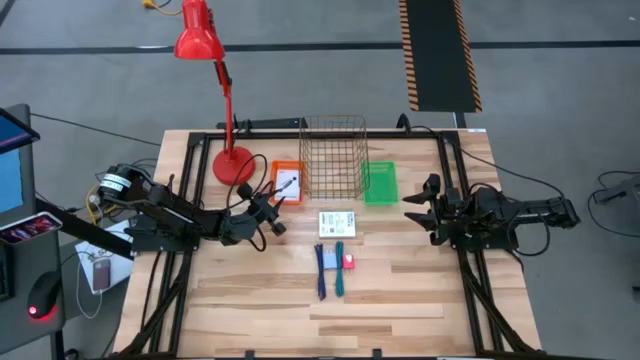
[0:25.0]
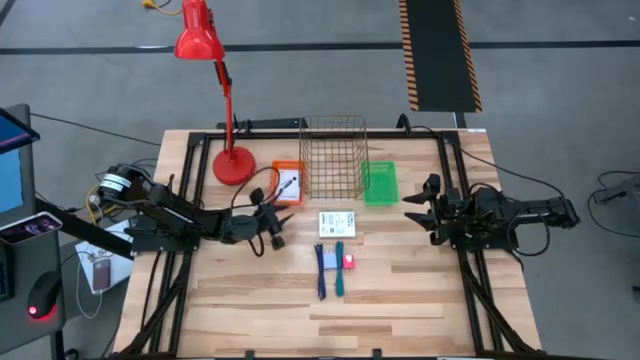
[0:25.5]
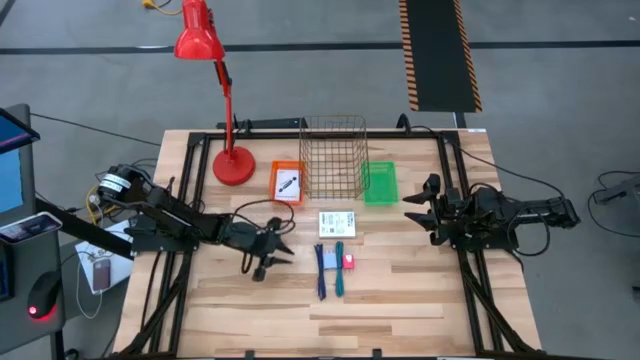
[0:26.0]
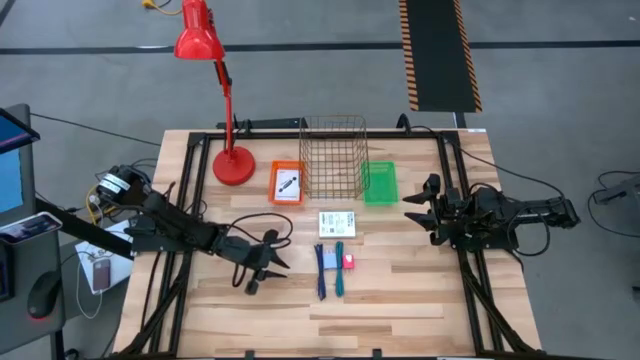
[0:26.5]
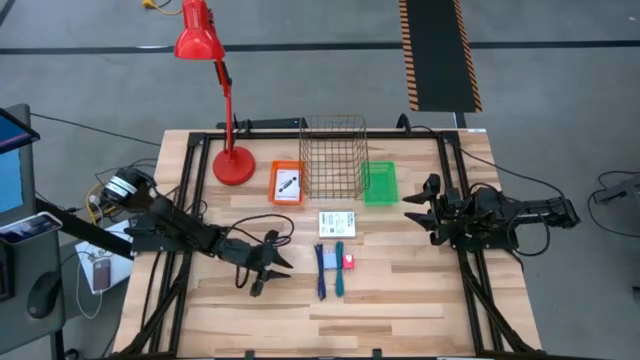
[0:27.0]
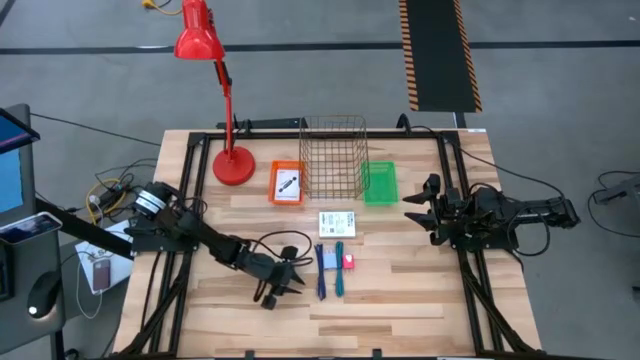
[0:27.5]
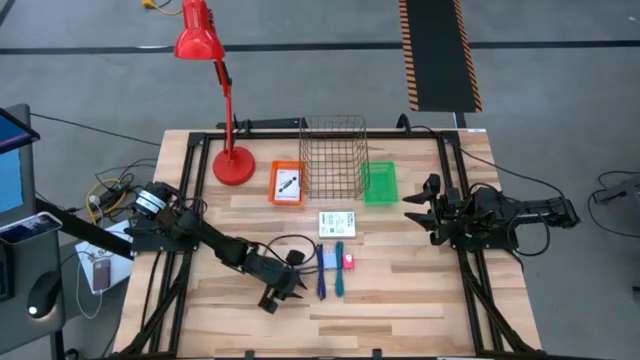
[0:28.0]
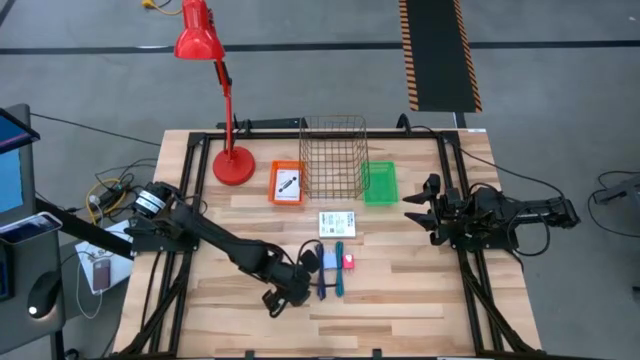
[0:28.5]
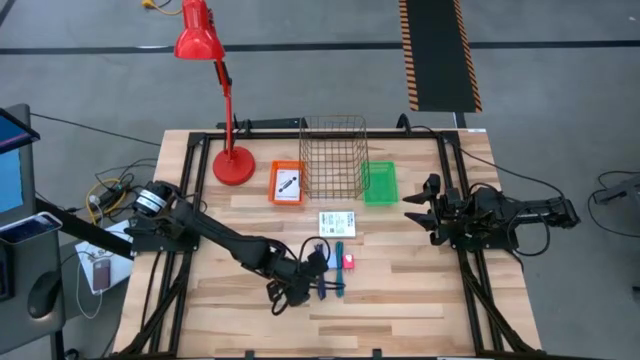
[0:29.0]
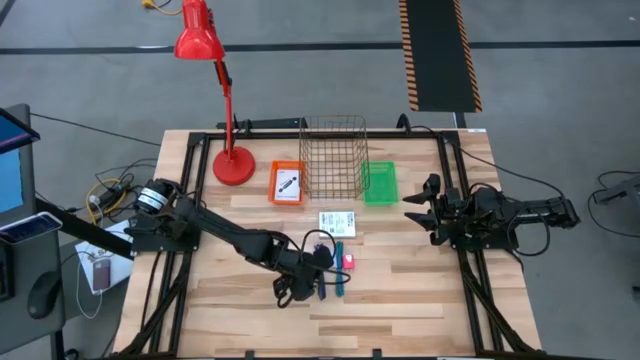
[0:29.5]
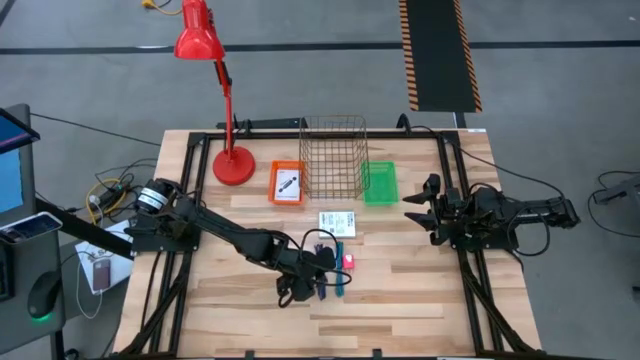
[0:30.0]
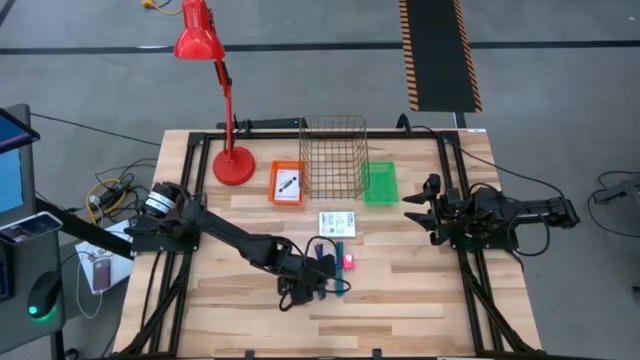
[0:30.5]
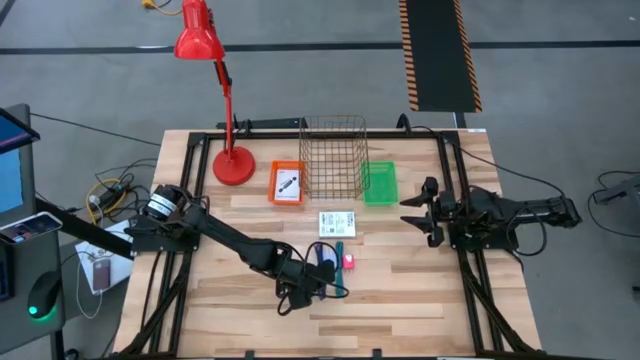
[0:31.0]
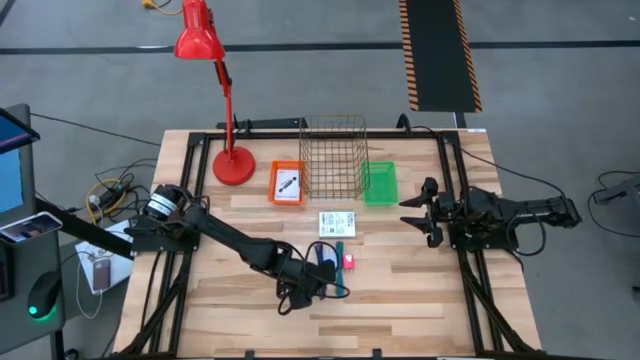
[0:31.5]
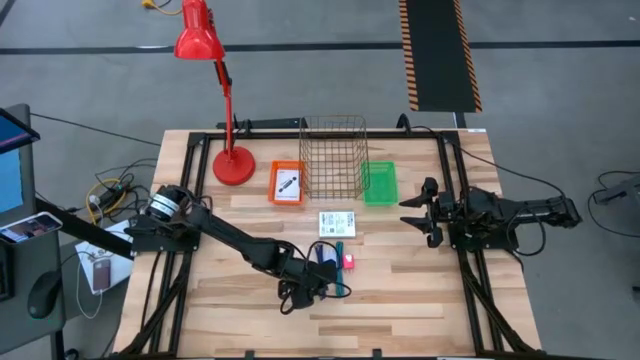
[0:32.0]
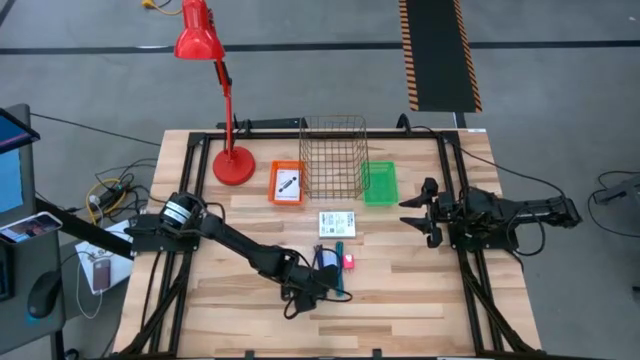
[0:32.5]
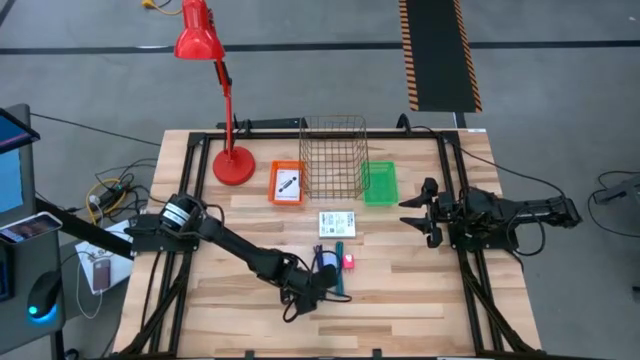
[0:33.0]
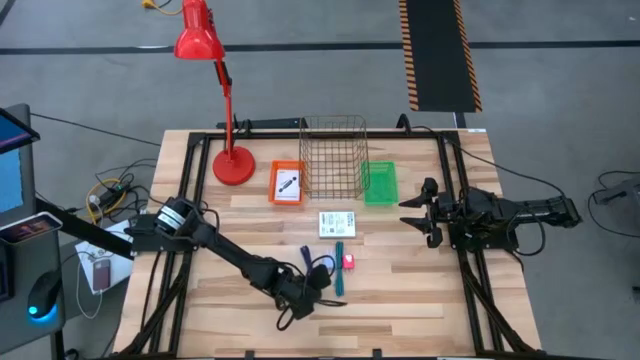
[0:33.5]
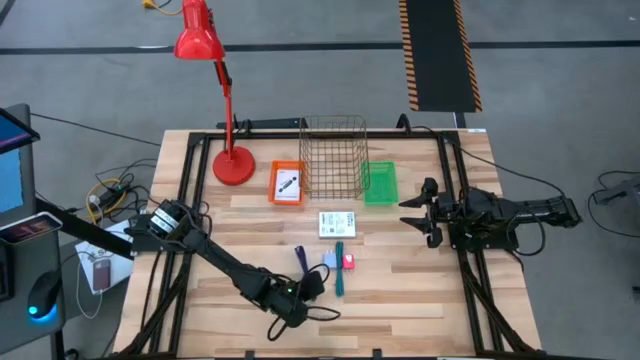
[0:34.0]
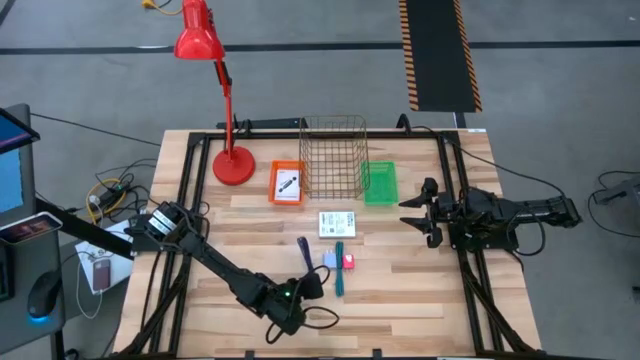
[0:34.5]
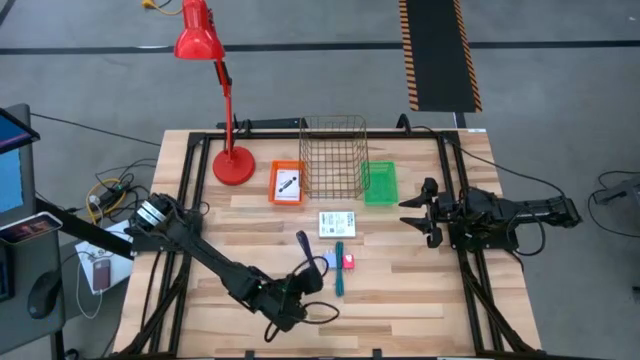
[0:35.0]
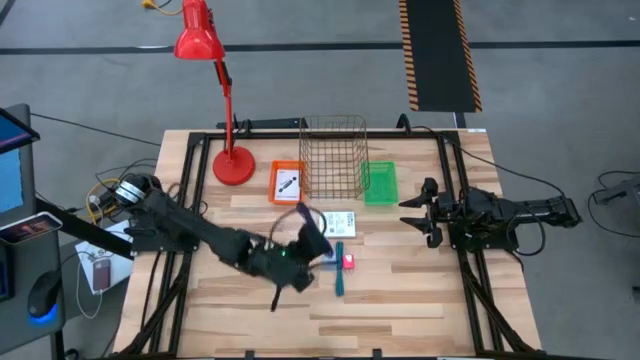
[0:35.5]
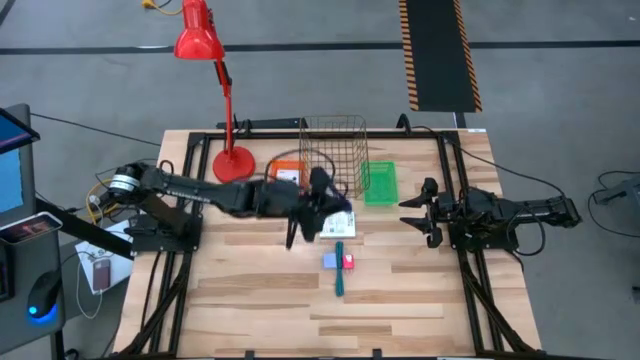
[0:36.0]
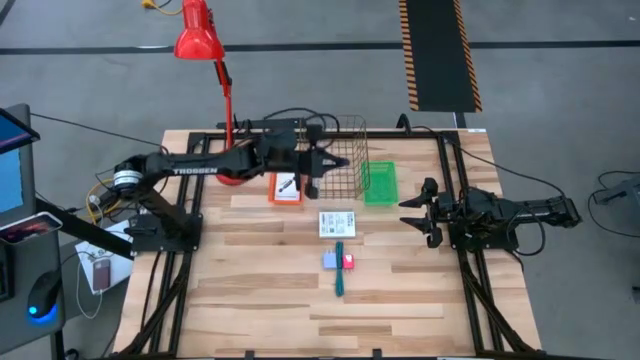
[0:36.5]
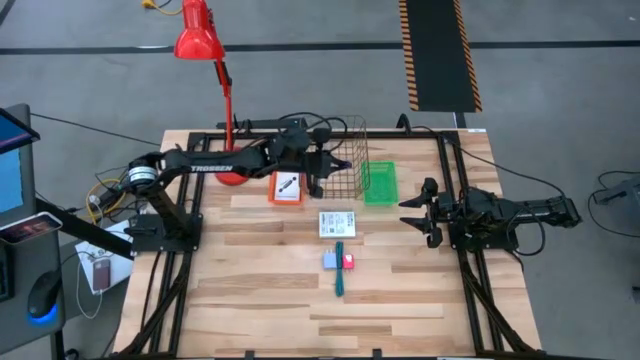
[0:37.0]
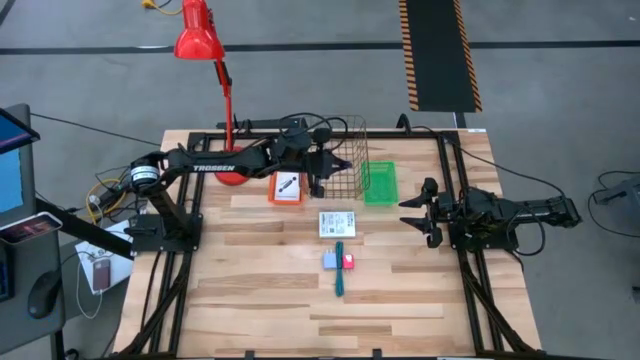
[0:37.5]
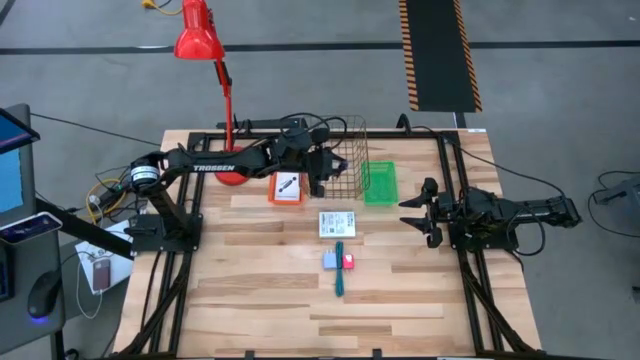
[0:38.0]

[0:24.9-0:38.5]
Task: Pick and place items into bin
Put the violet charger cable into the wire basket

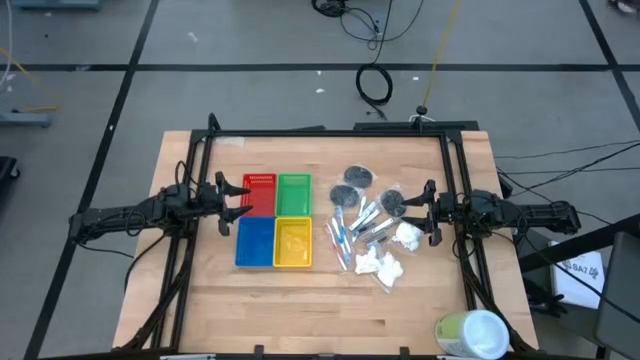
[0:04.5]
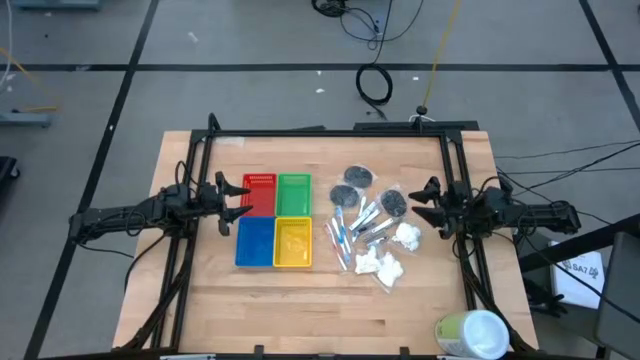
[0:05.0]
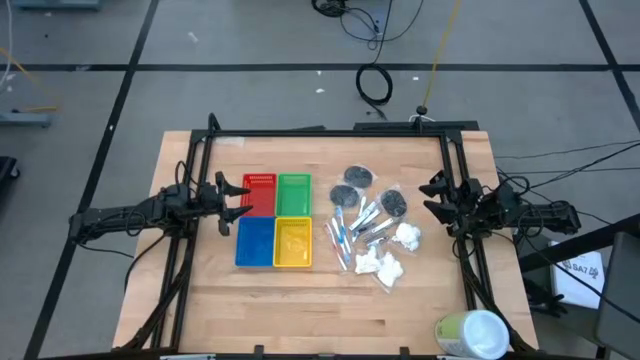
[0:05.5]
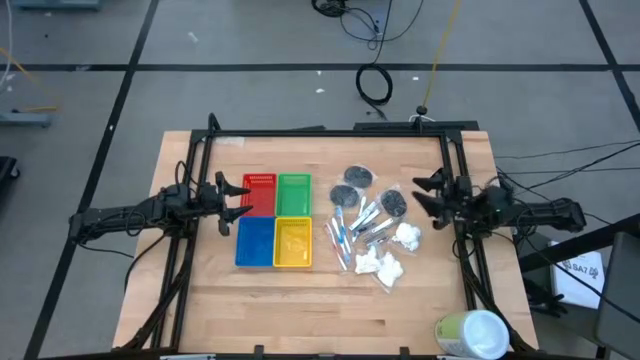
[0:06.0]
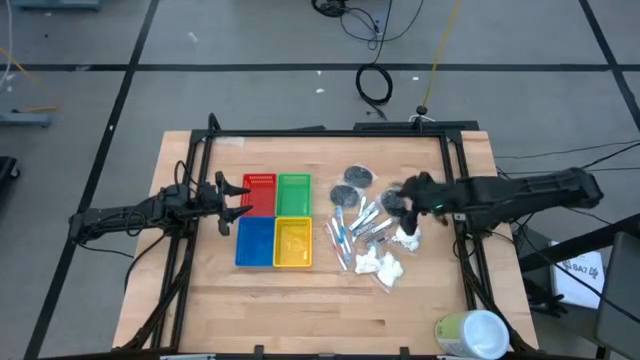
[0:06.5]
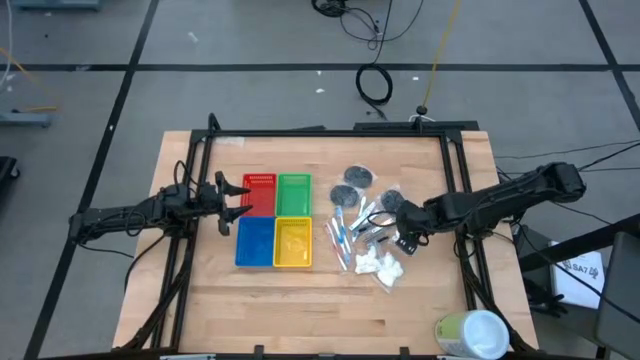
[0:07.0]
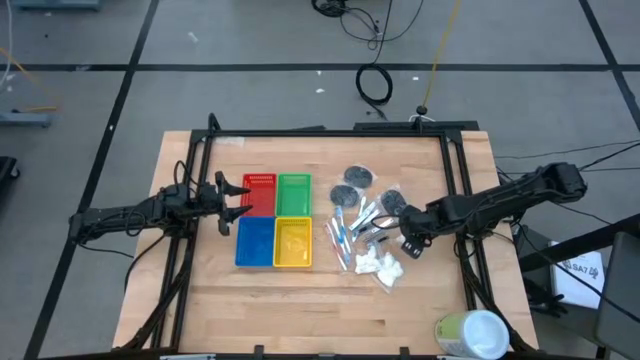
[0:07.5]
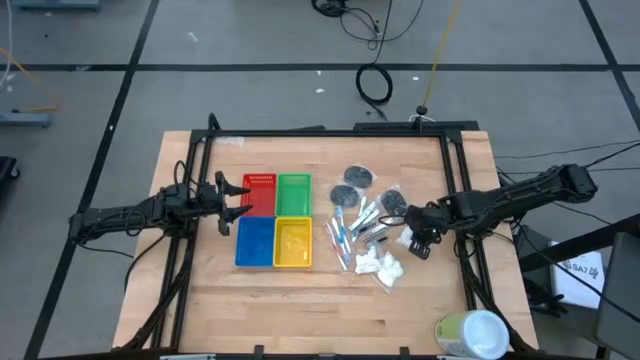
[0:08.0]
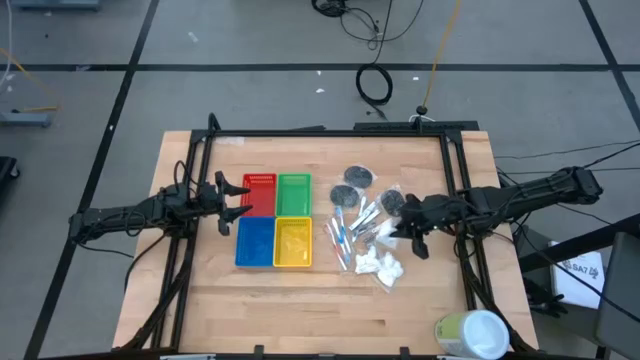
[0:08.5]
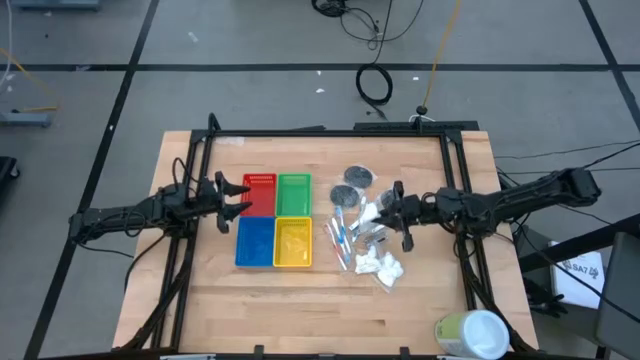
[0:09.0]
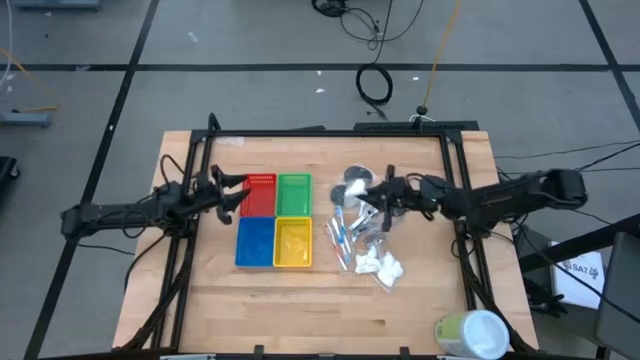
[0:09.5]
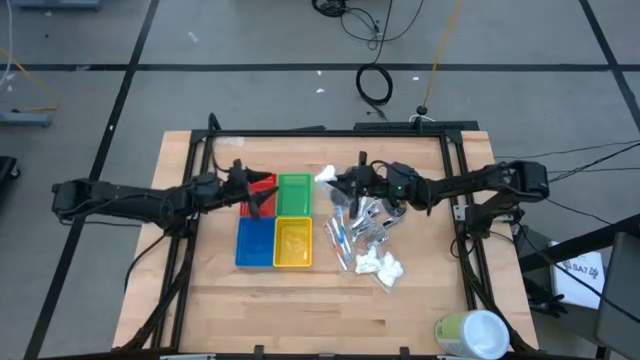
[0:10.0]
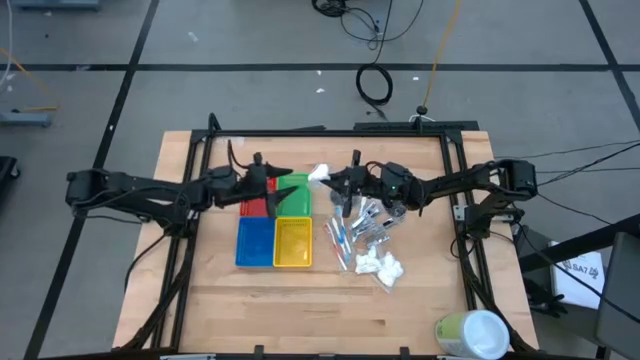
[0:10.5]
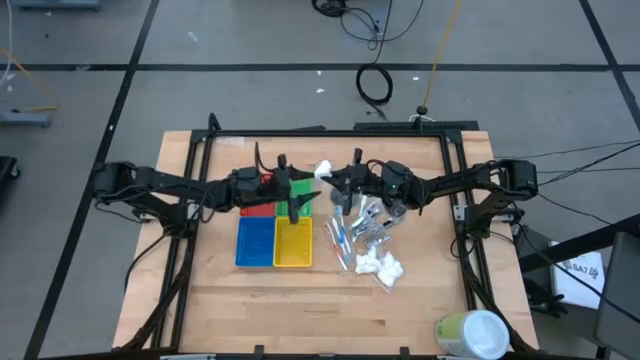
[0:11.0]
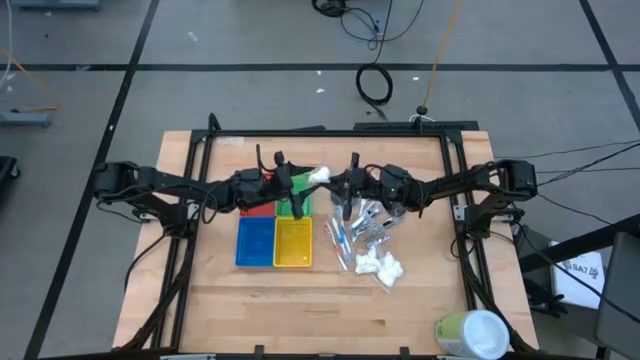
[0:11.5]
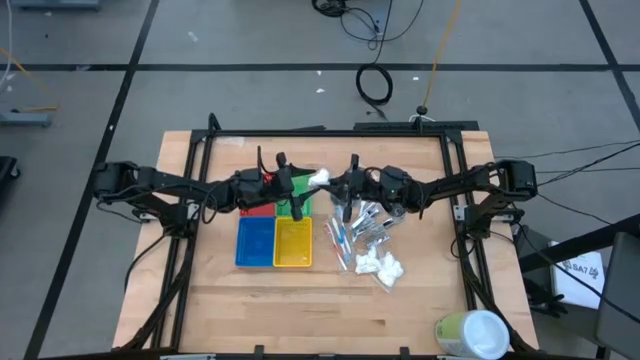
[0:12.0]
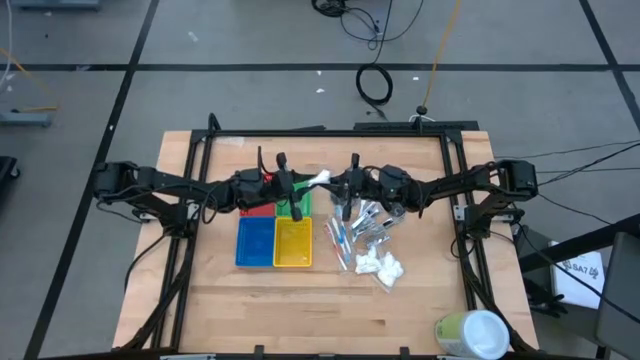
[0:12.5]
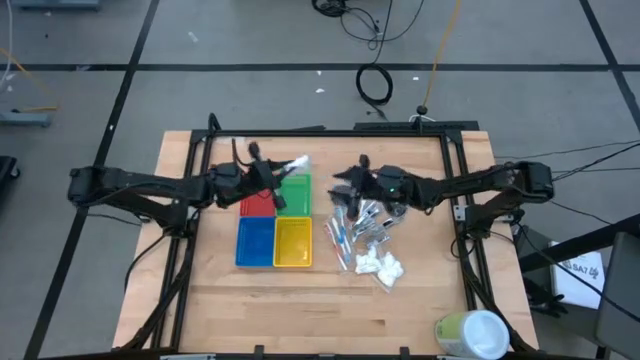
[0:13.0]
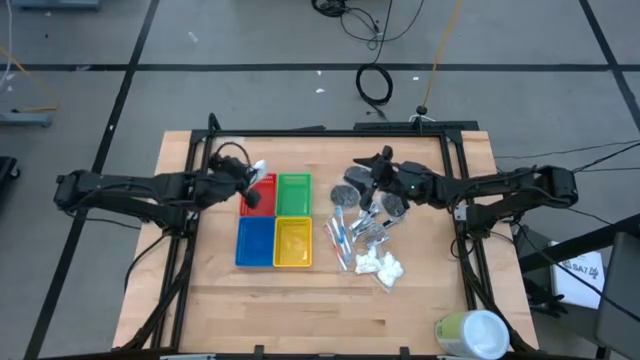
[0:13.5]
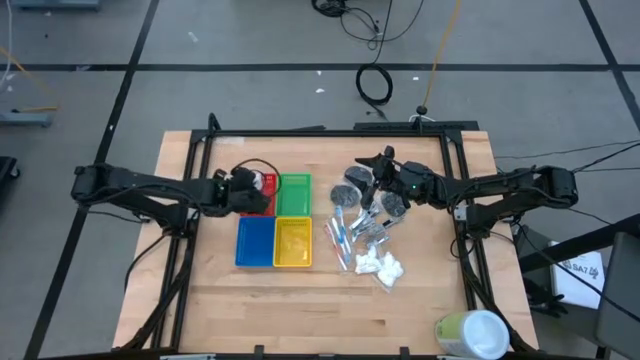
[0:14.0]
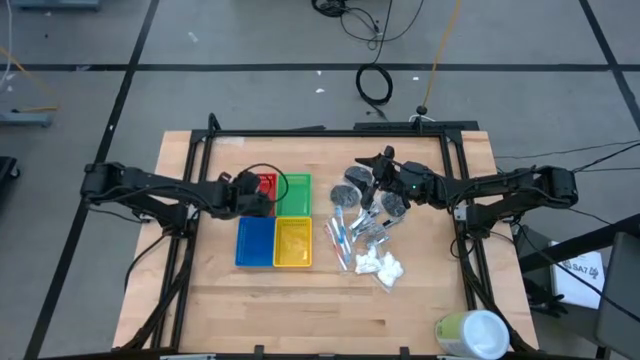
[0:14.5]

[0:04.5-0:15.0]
Task: Pick & Place Travel size toiletries
Put the white cotton pack into the red bin
